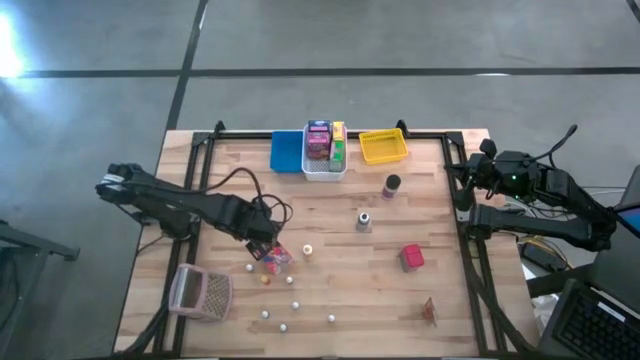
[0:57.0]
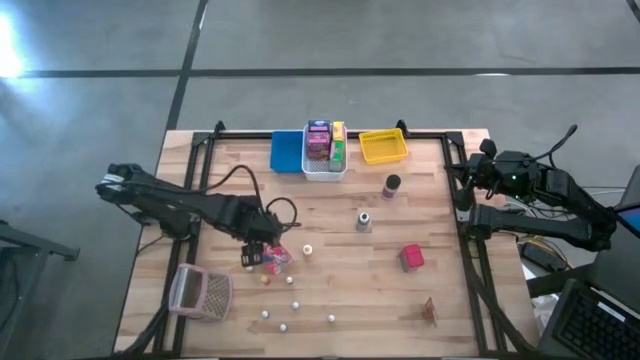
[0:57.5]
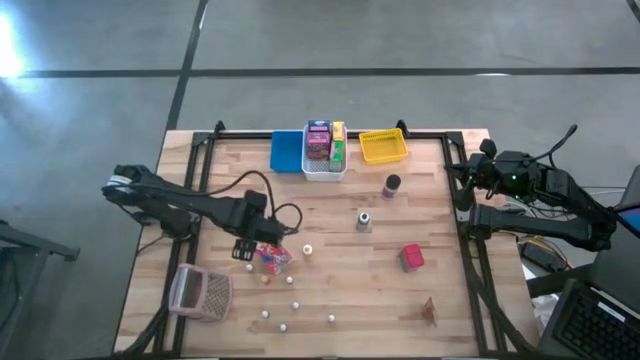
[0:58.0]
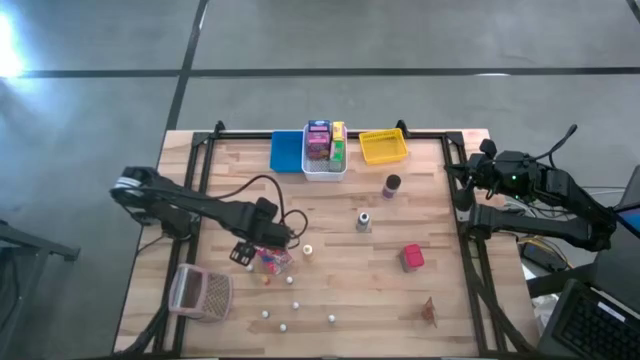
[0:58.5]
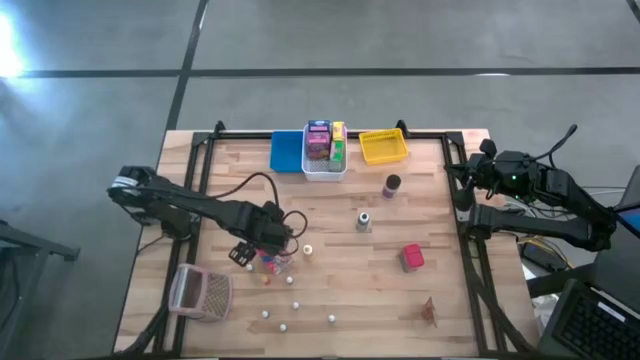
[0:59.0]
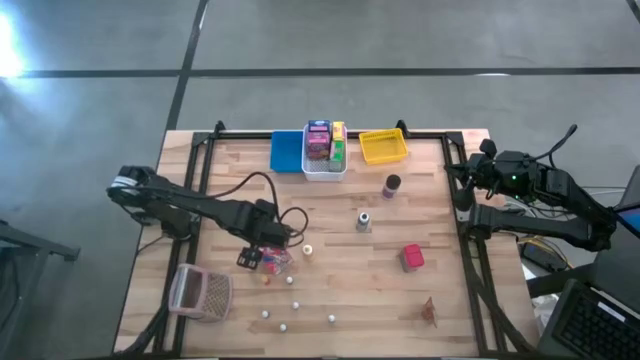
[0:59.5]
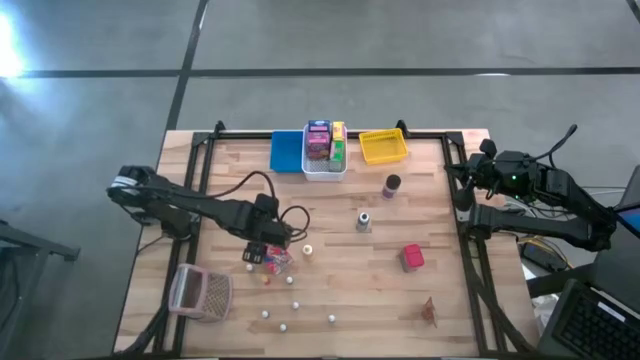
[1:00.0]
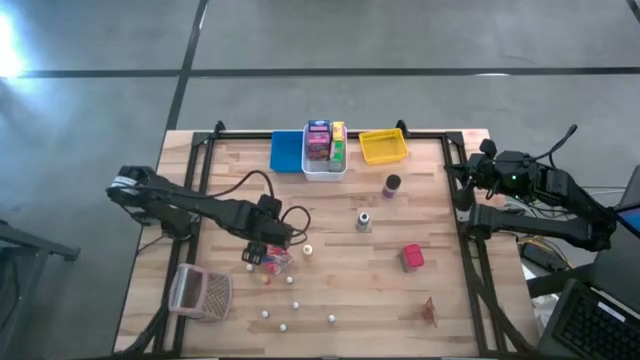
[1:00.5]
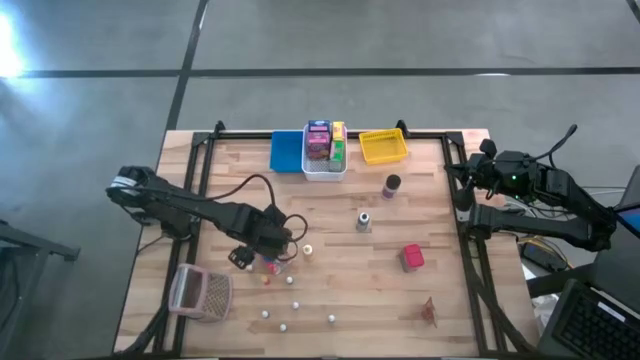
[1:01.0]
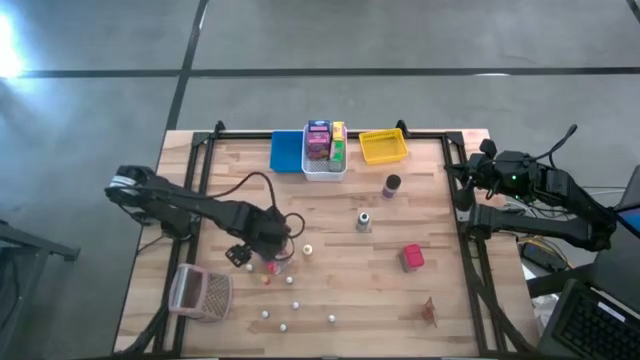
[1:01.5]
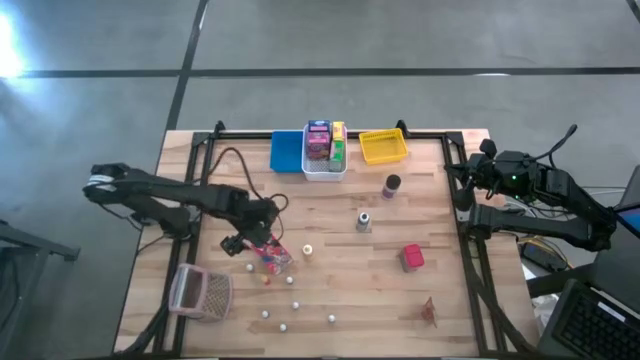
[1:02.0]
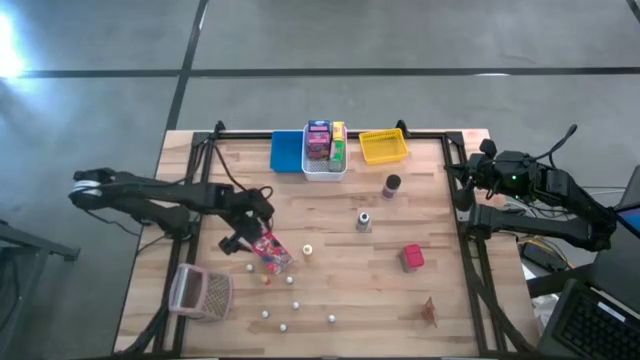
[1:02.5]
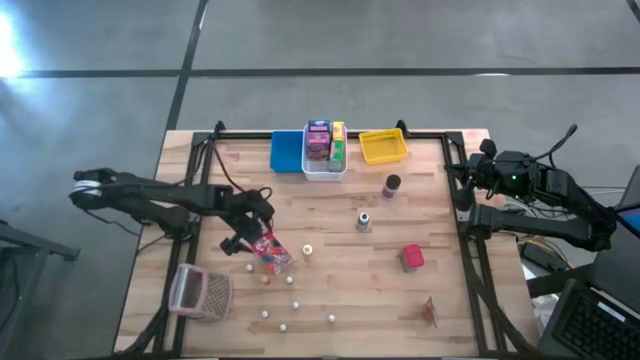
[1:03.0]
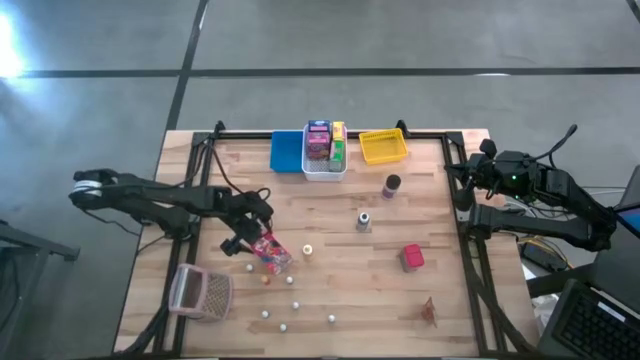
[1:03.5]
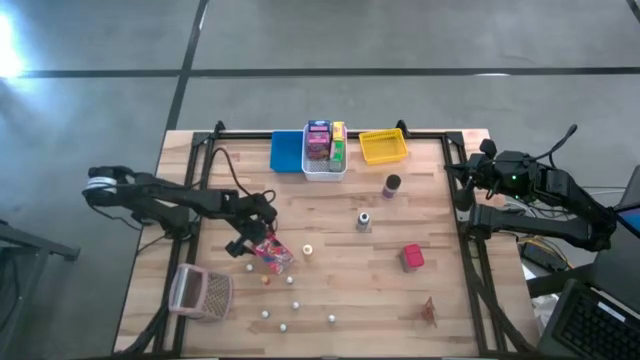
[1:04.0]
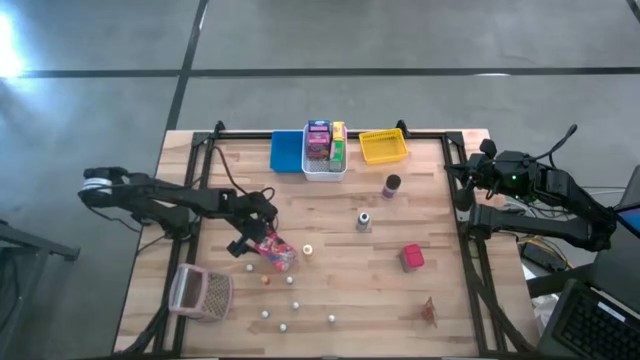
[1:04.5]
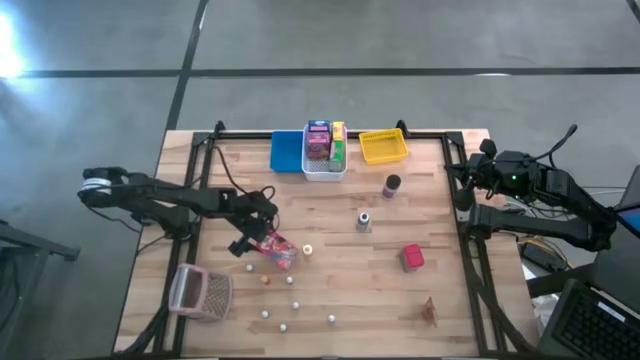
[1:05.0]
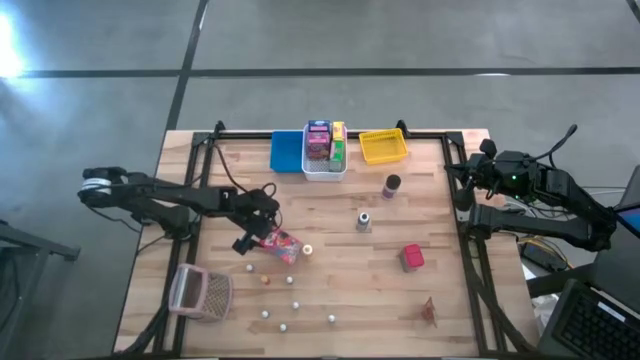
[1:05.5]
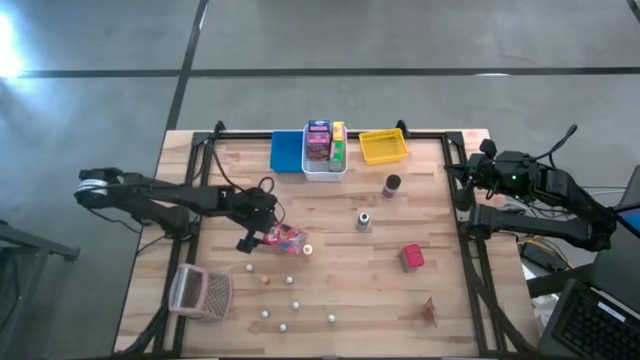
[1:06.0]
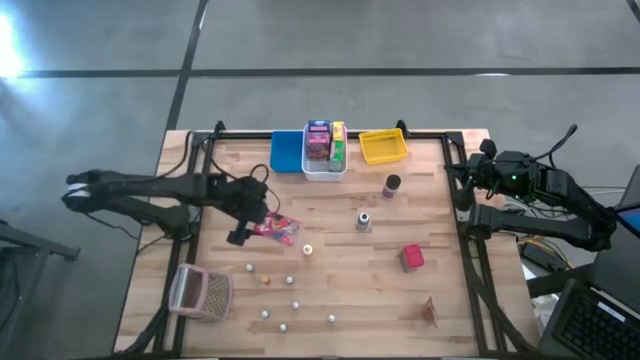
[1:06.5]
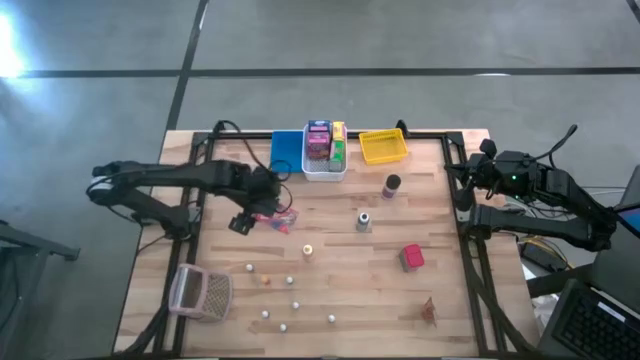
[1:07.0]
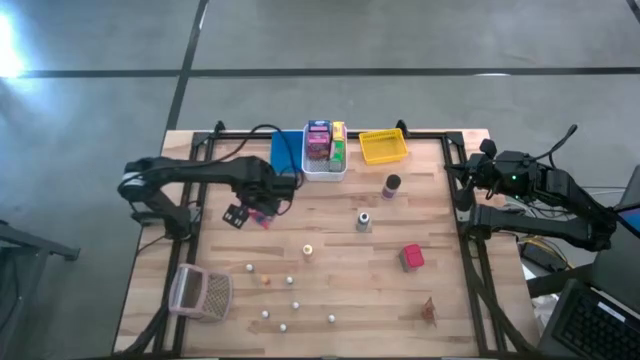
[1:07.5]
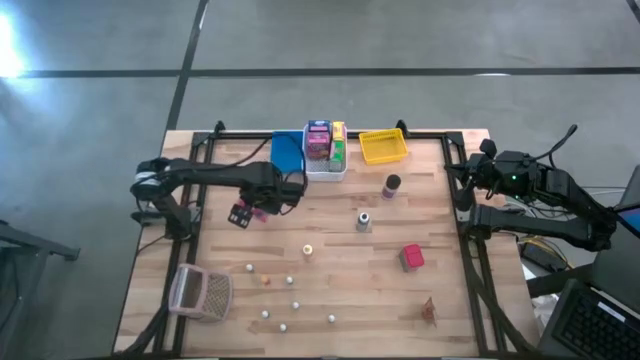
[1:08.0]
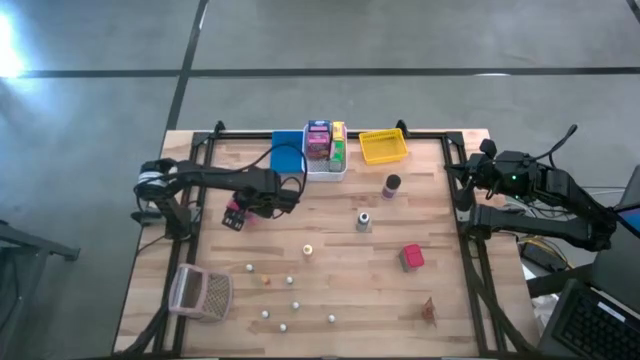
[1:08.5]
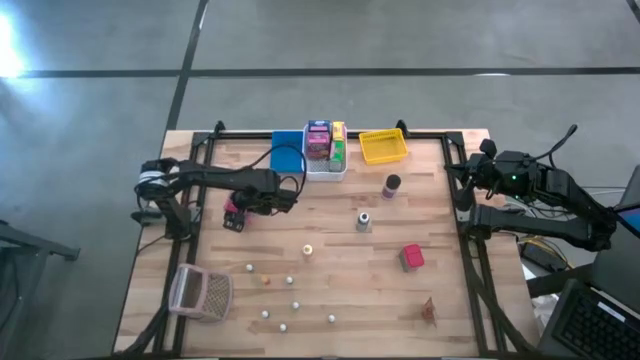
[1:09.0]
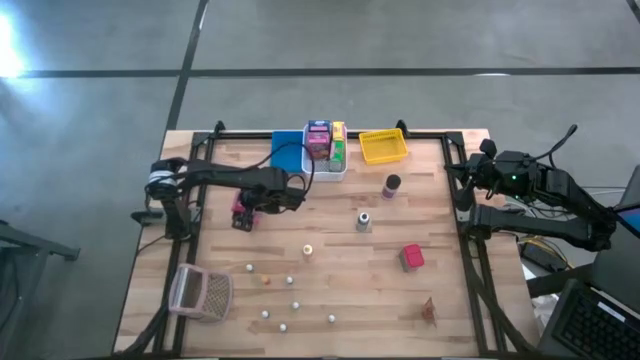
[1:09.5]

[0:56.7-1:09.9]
Task: Pick & Place Kitchen Items
Put the red cereal box into the white bin

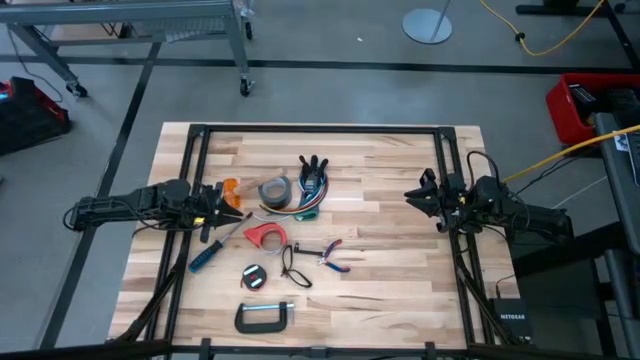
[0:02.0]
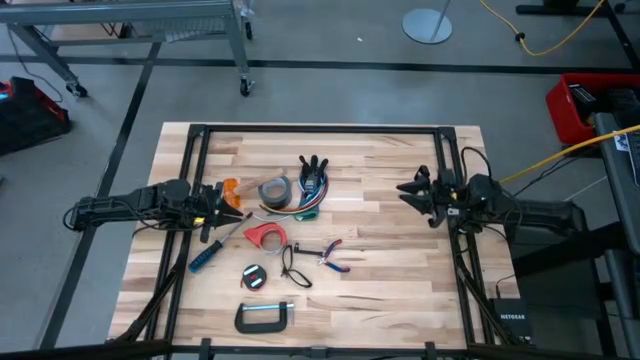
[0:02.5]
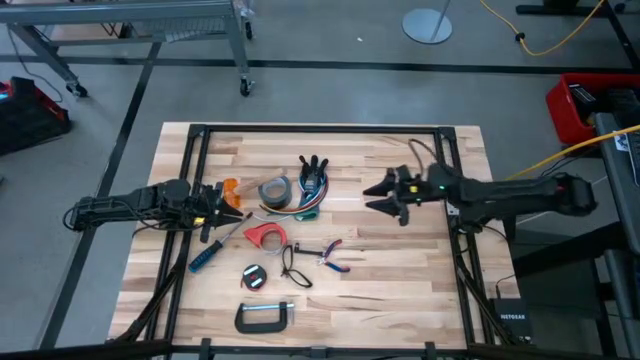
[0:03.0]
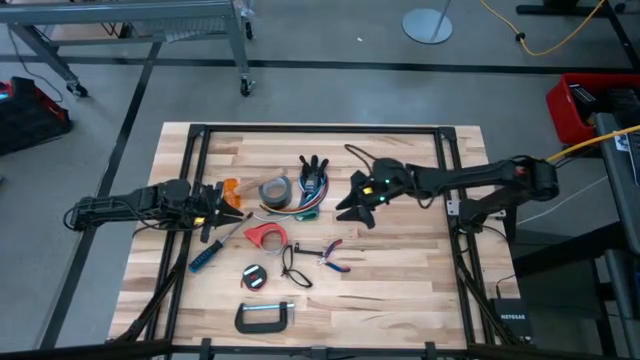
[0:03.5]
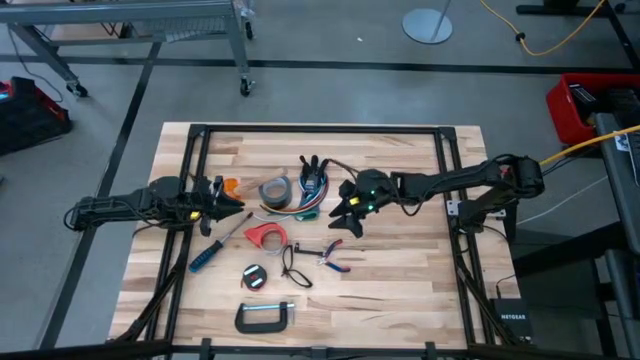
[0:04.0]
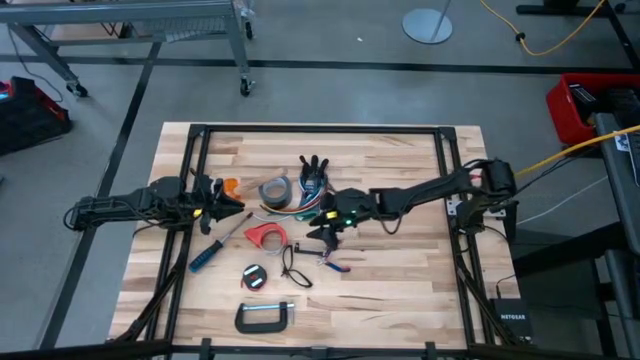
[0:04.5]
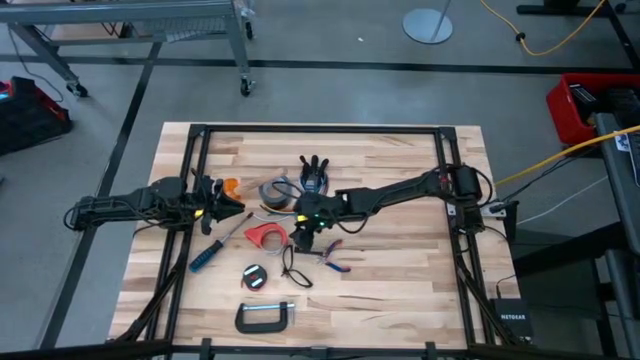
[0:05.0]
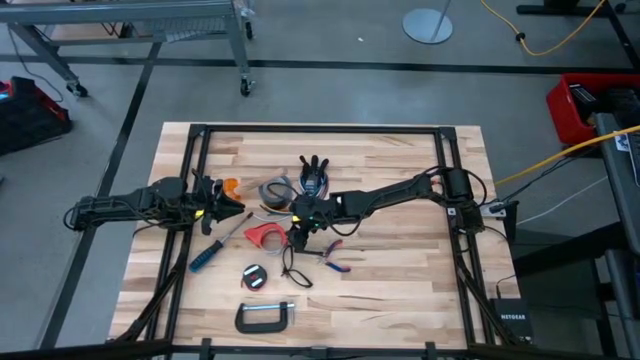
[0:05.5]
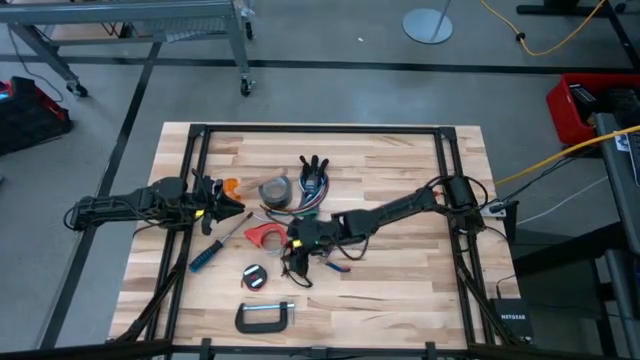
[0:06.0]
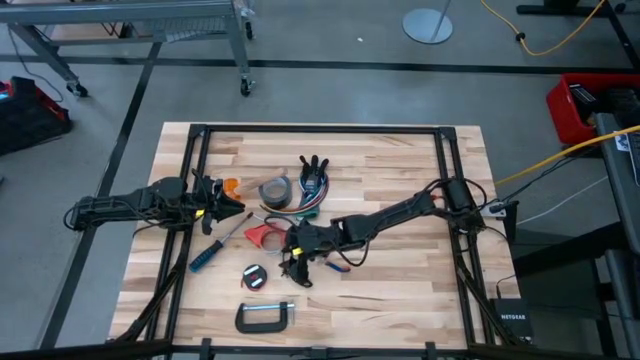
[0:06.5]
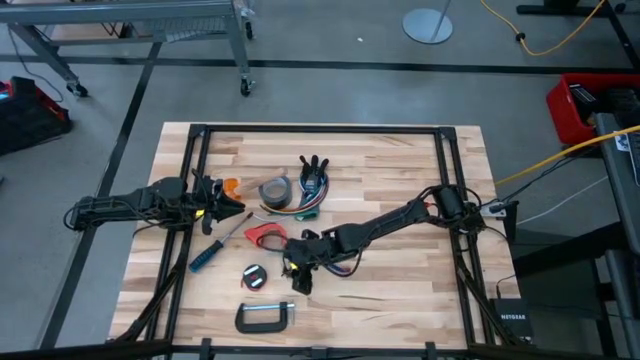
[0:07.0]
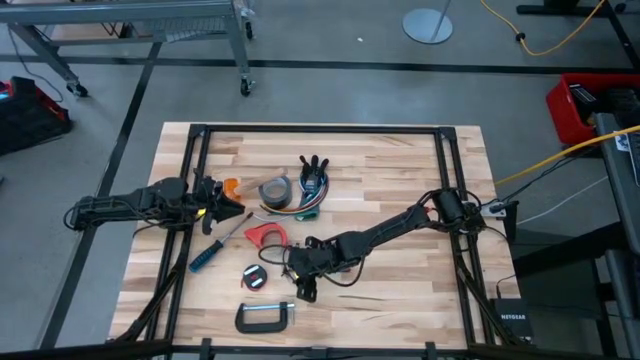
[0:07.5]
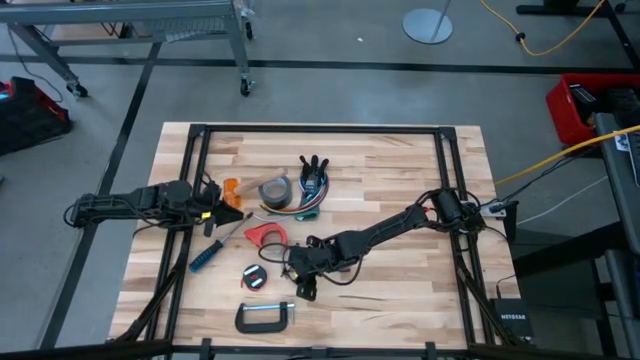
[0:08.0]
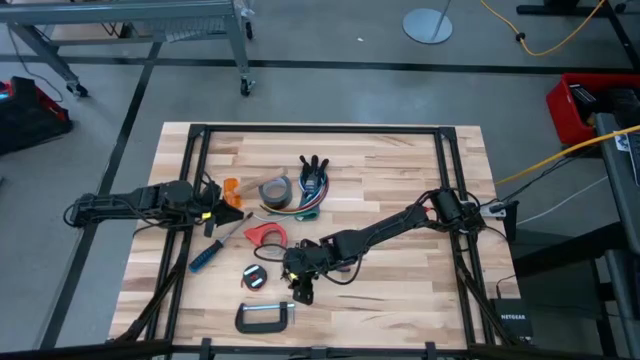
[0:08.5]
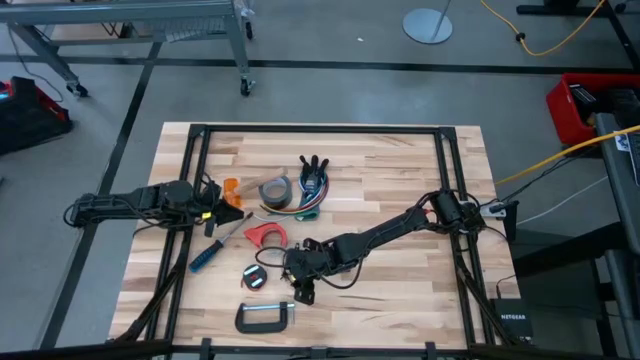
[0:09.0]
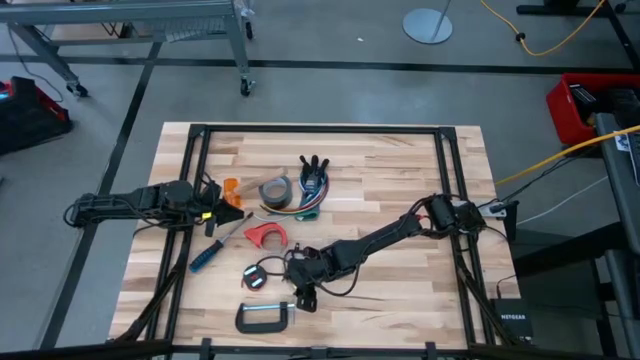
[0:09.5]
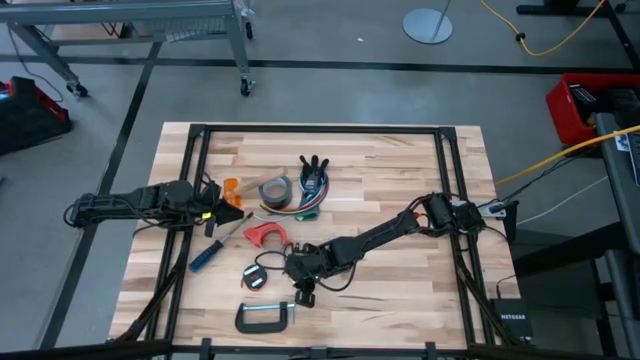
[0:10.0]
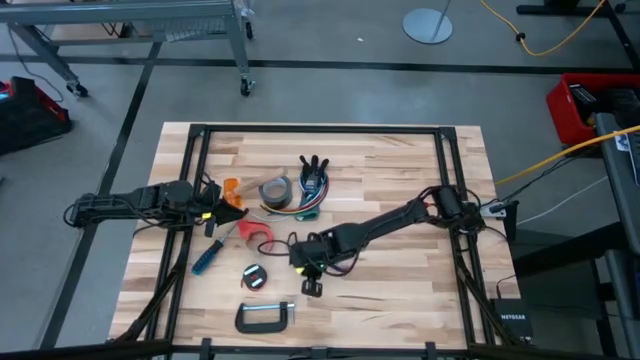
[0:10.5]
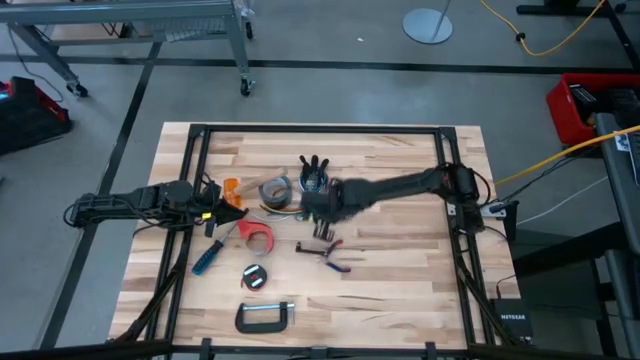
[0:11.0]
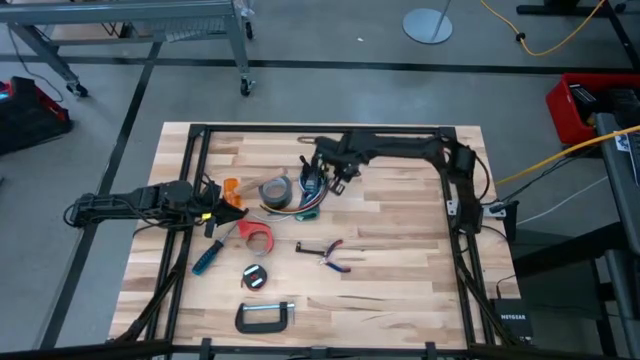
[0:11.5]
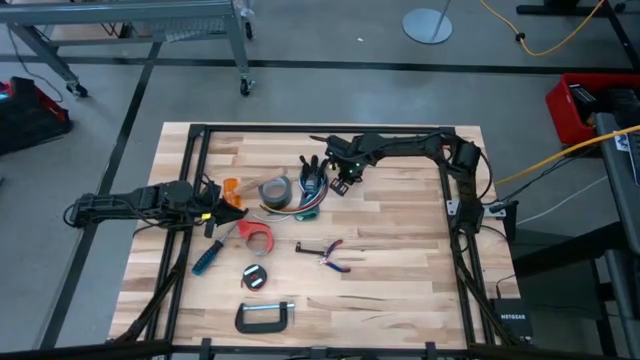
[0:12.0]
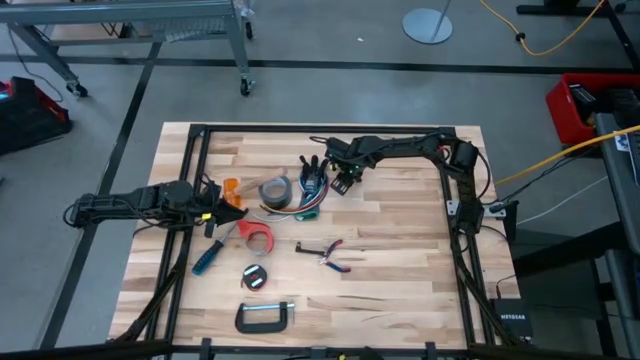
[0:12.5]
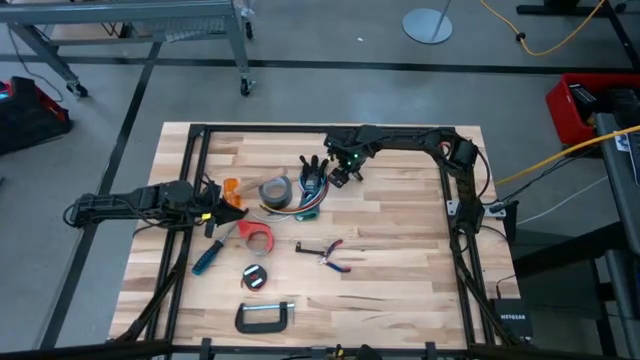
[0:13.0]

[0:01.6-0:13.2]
Task: Coil cords
Put the safety goggles on the top center of the table
